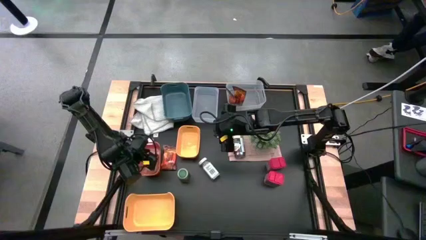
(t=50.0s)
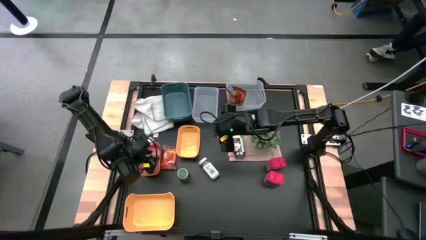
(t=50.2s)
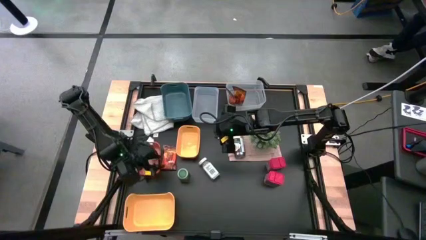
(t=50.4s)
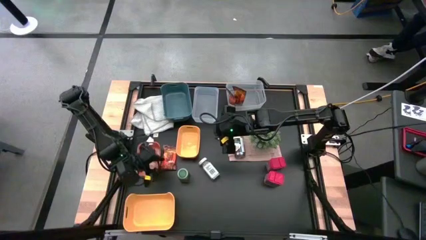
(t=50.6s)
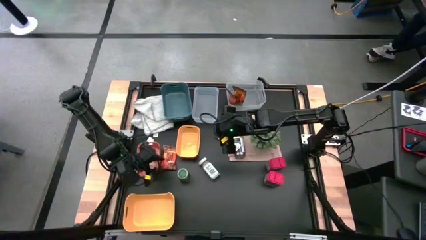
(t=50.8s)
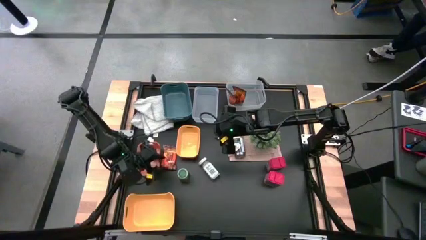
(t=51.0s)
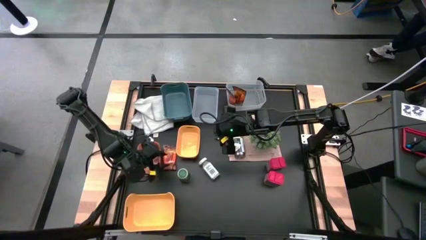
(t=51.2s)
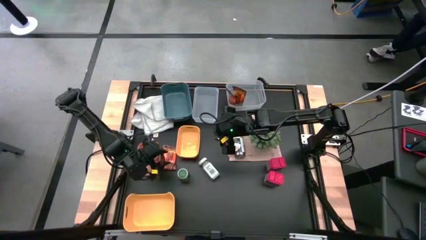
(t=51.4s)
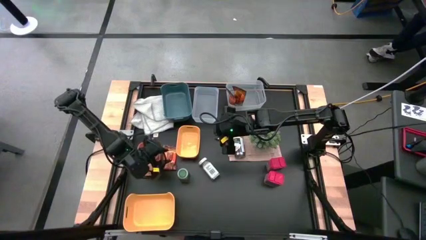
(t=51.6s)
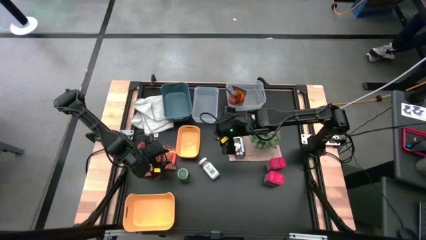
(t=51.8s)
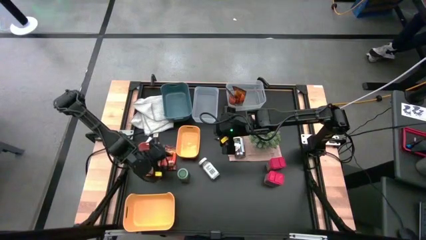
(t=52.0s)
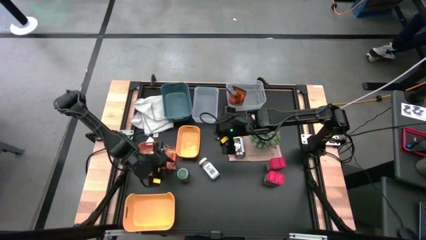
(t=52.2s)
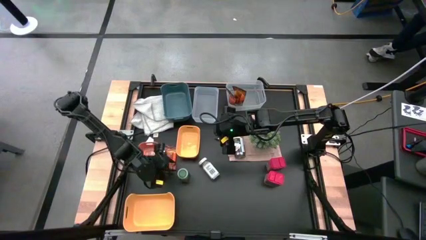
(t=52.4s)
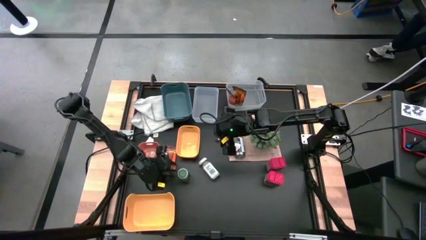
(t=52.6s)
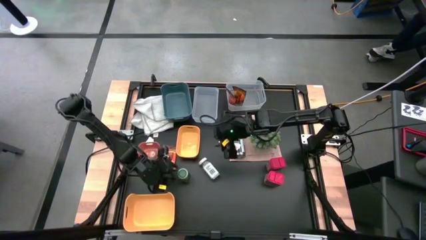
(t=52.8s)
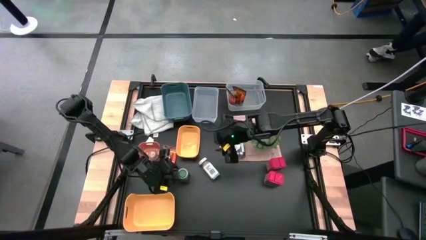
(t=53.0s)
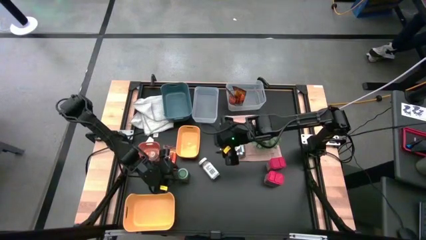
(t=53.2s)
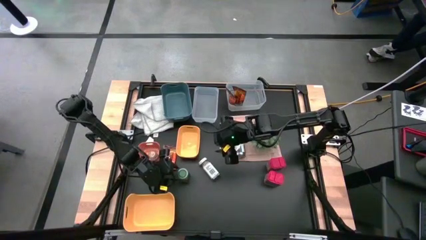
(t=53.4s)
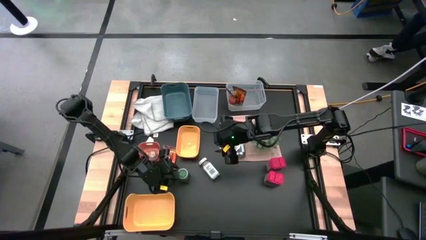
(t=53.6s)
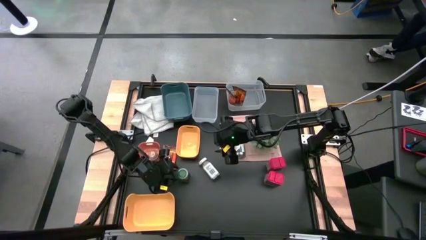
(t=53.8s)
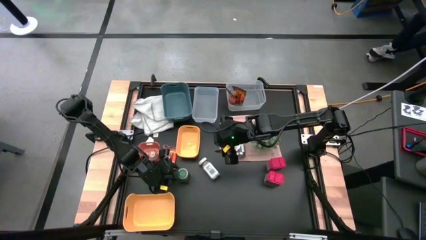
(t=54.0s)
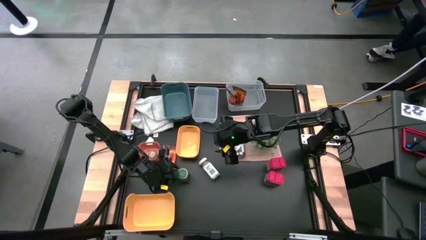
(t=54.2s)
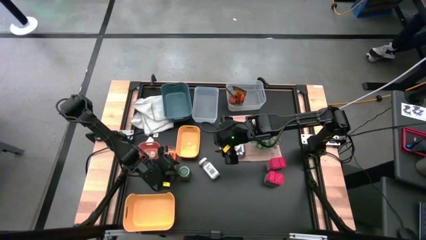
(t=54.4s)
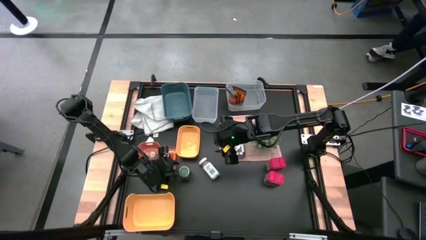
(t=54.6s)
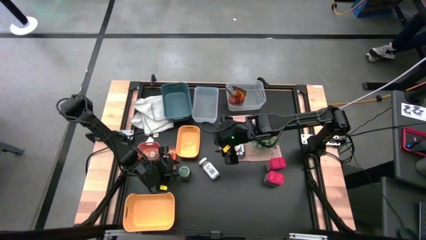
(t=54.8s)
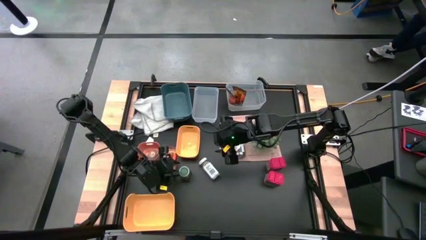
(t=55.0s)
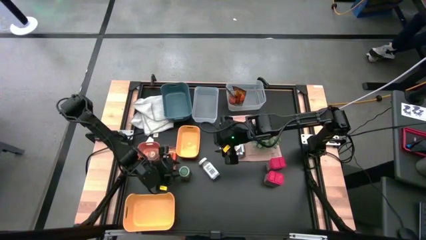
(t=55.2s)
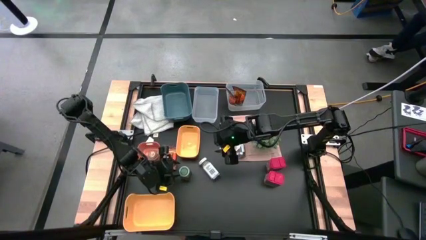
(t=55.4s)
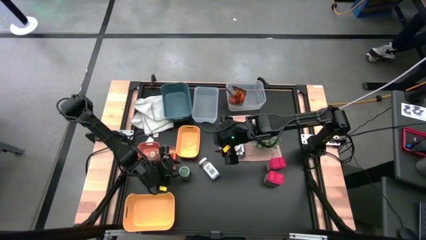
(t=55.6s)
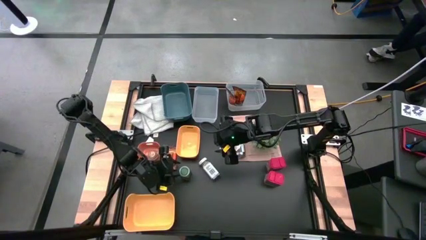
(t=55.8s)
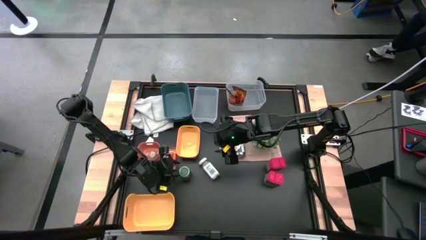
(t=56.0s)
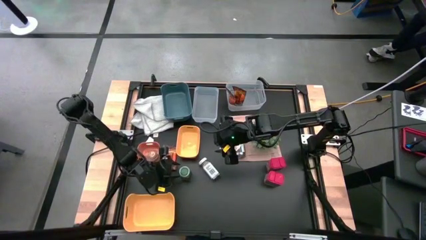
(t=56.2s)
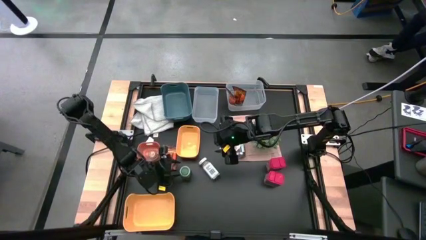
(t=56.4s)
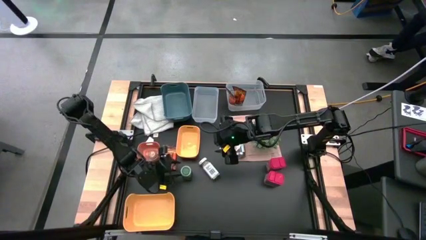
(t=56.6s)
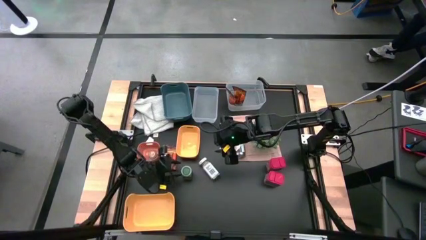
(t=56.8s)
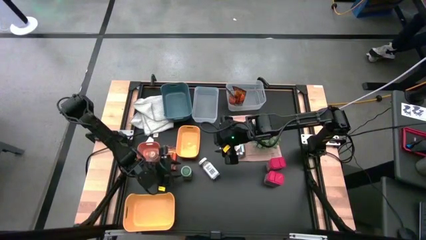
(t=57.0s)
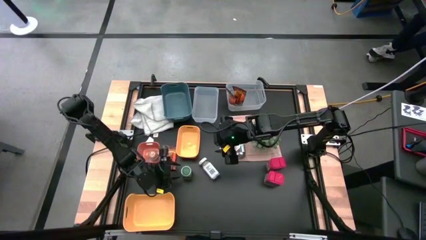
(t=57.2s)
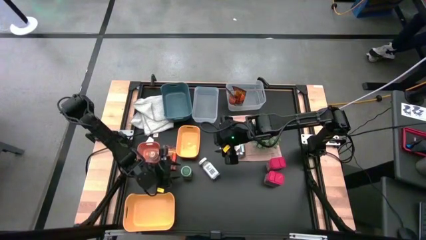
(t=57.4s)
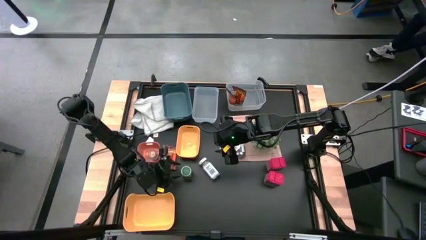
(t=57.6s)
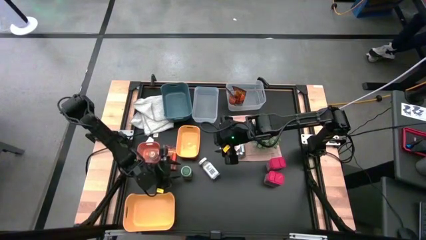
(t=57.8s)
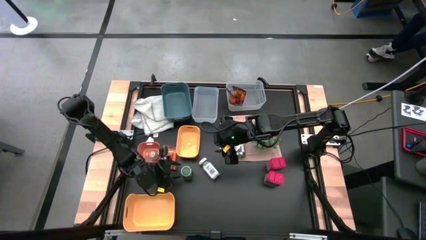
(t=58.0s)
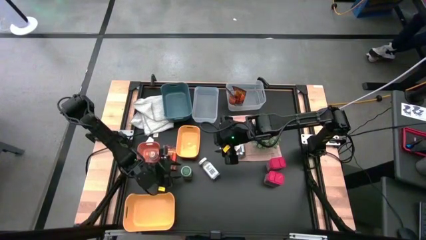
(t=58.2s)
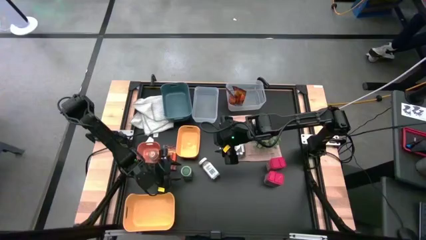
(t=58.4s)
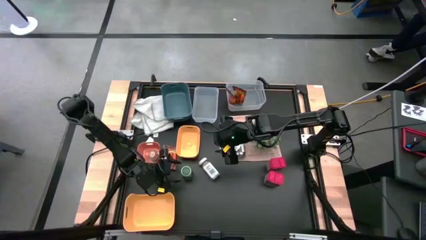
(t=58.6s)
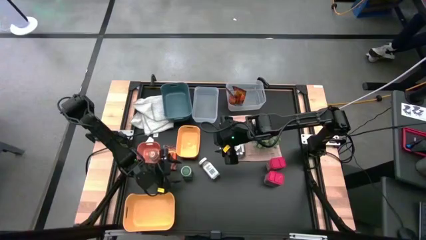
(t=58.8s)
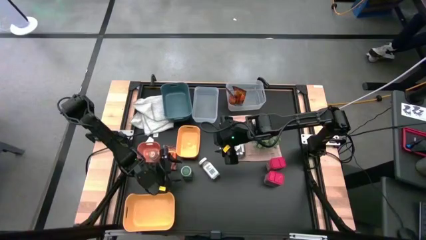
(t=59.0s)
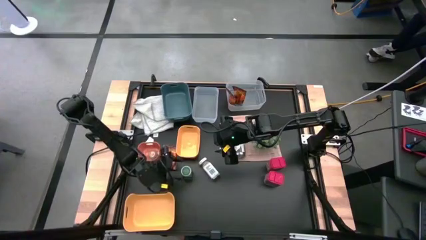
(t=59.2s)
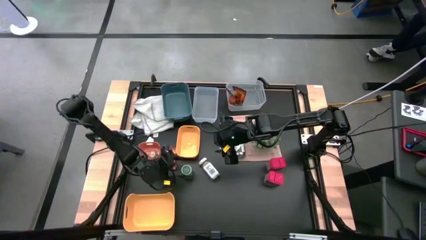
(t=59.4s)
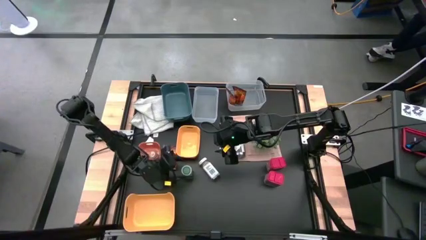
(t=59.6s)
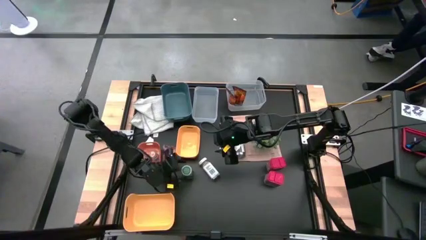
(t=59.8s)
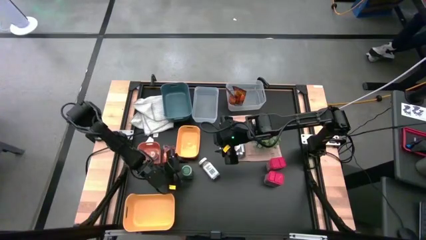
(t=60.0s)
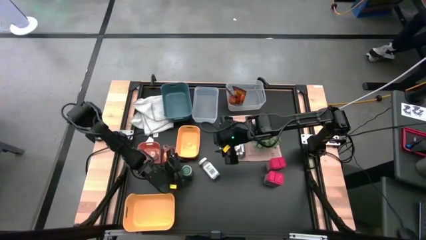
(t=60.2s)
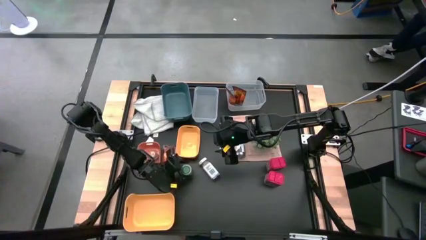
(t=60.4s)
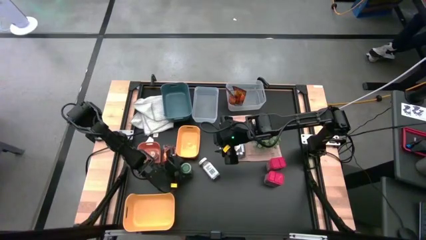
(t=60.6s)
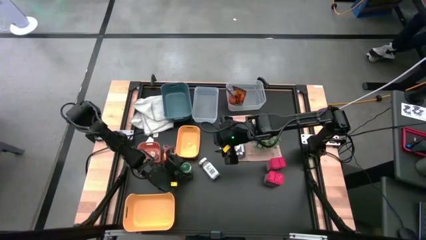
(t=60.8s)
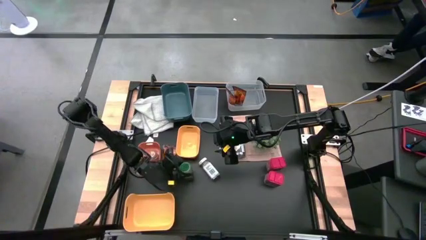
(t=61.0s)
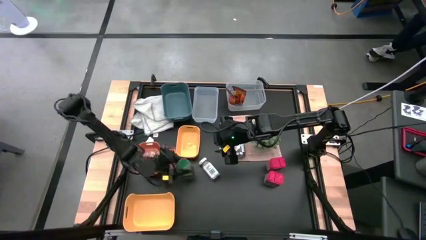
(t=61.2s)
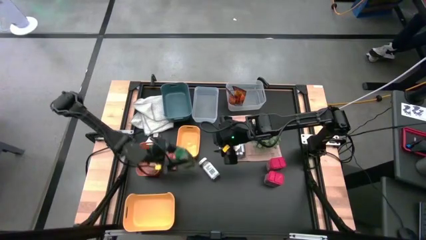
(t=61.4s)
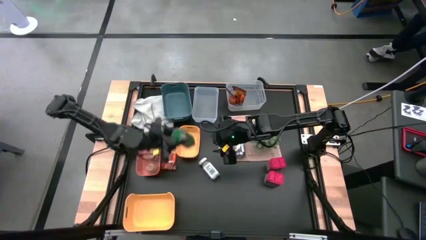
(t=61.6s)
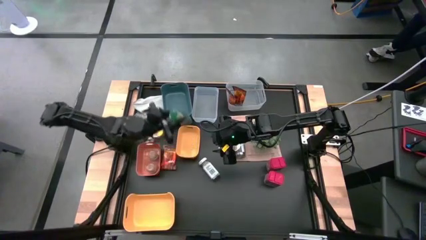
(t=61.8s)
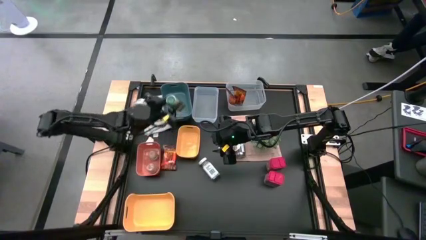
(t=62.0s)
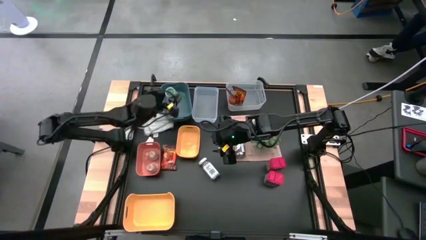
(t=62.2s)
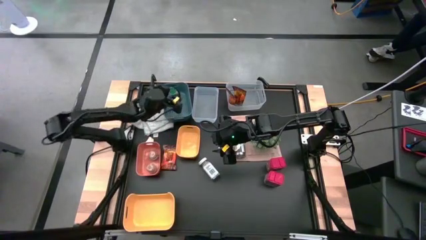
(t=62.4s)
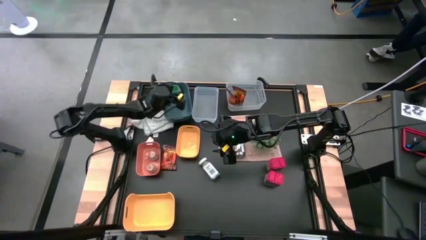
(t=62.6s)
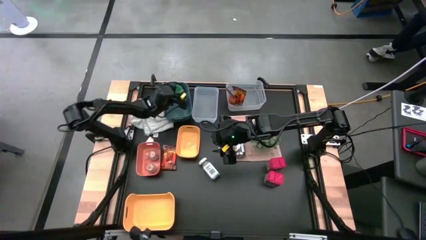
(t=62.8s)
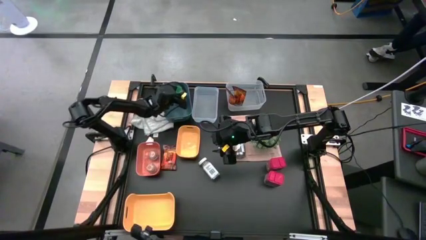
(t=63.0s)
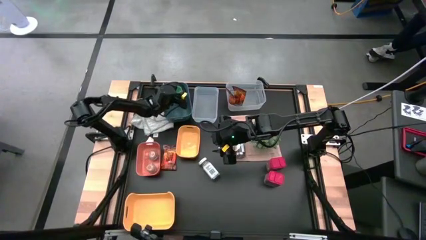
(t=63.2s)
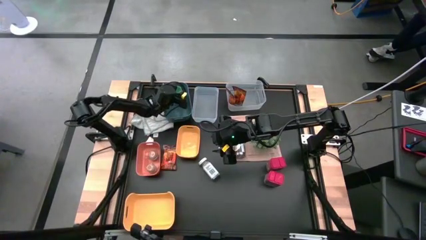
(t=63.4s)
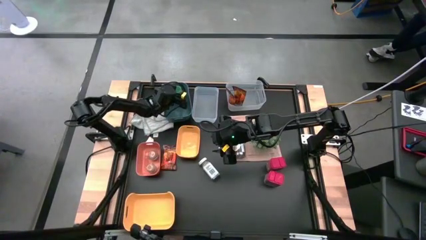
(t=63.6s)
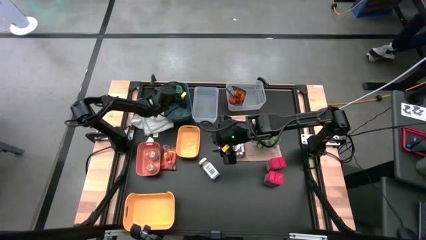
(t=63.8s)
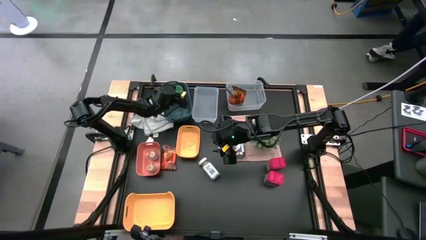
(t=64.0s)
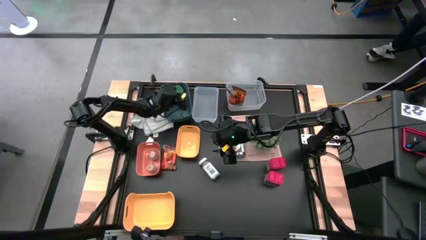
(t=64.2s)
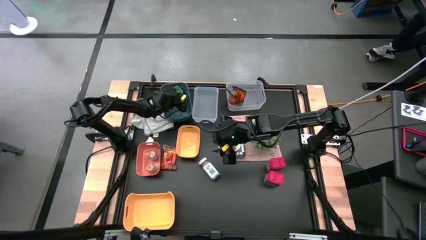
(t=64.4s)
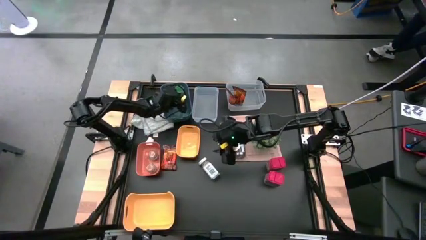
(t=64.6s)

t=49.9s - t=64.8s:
Task: Sort spices by type
Put the left green seasoning bottle into the blue bin

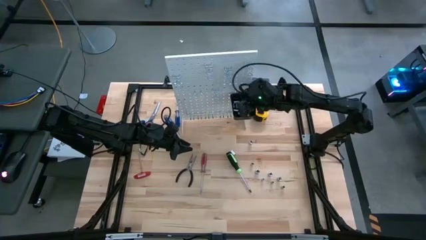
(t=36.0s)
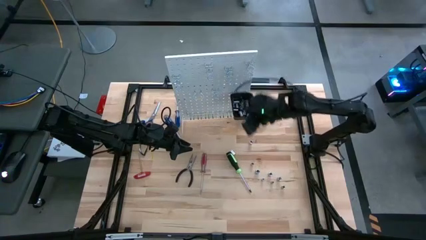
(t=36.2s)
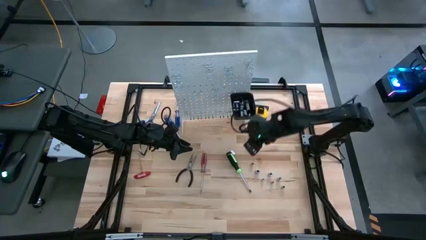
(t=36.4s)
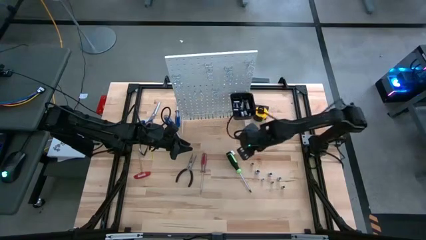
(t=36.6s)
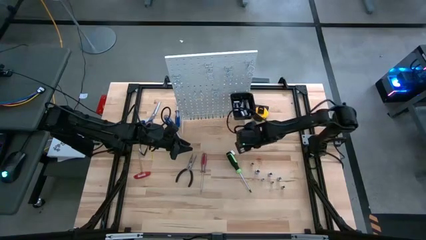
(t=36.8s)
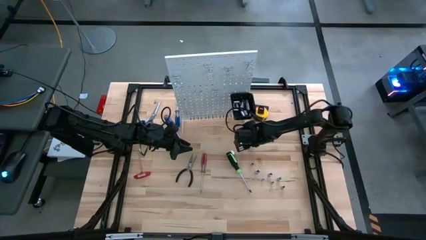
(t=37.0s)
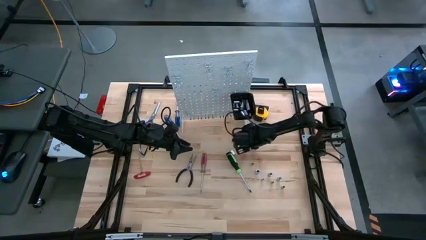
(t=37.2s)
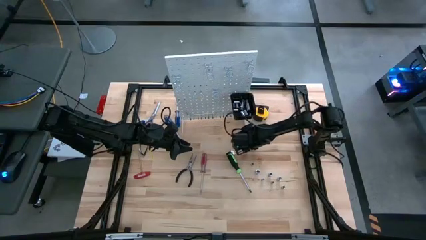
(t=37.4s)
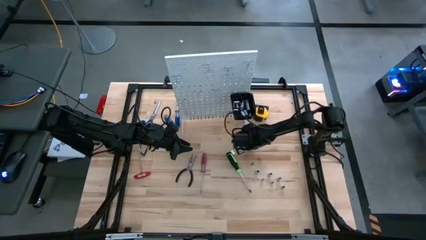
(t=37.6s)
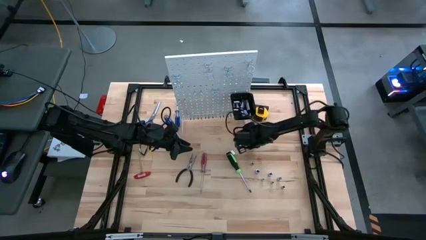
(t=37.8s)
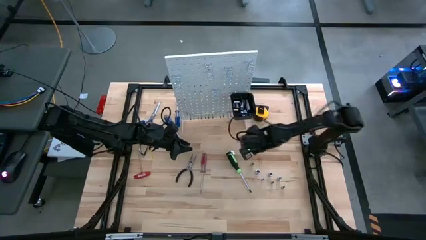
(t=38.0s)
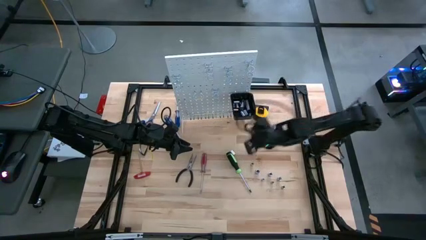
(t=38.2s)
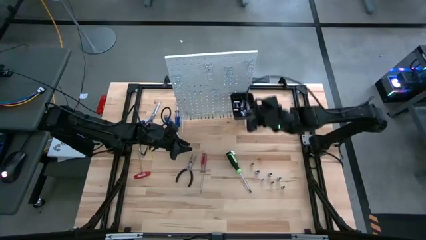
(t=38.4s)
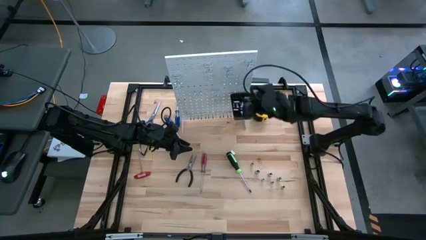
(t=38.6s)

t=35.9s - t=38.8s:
Task: Hang tools onto peg board
Put the silver socket into the black bin on the peg board
